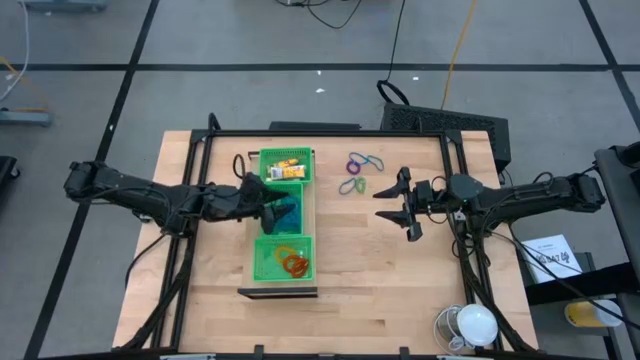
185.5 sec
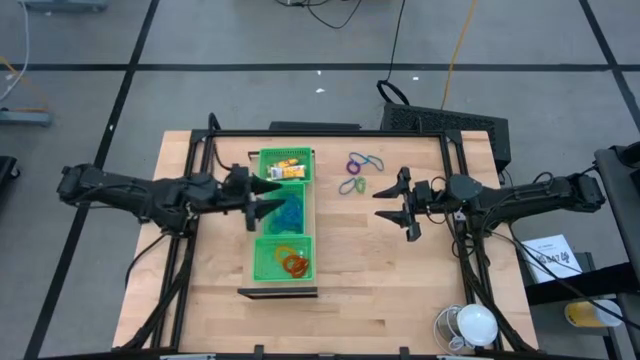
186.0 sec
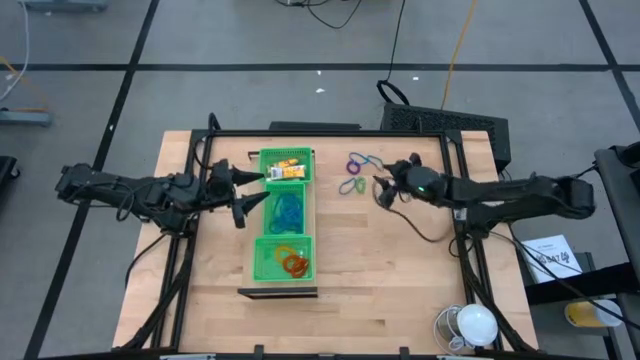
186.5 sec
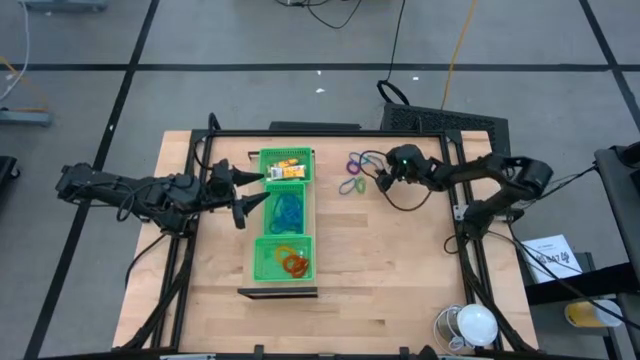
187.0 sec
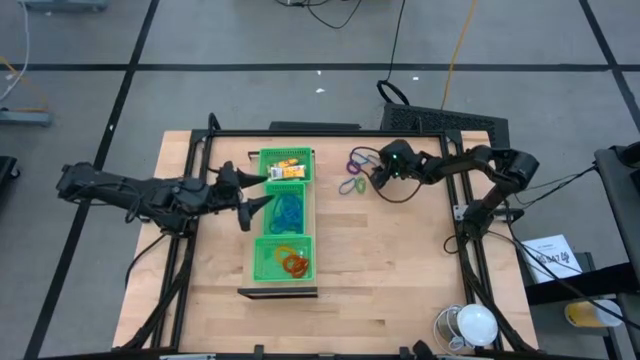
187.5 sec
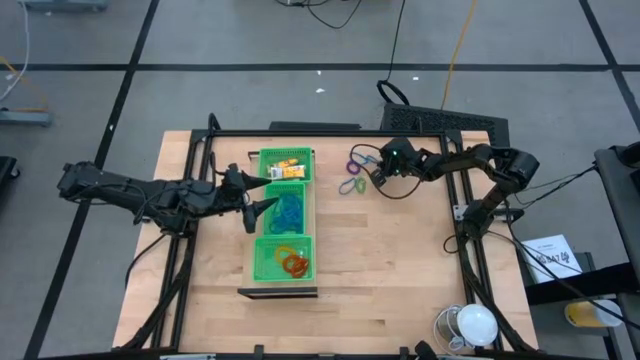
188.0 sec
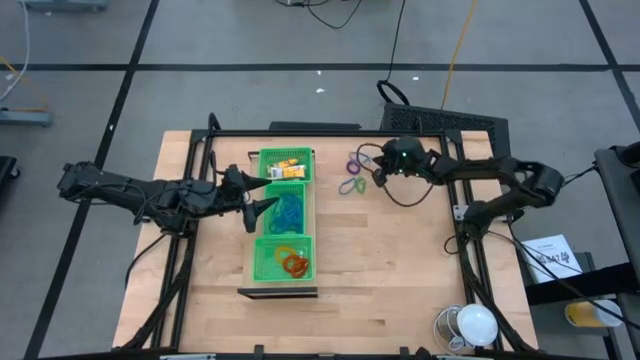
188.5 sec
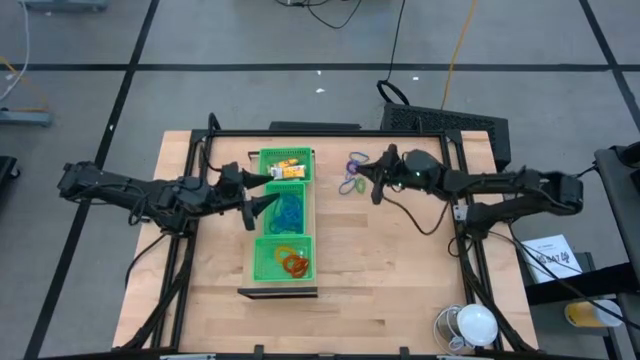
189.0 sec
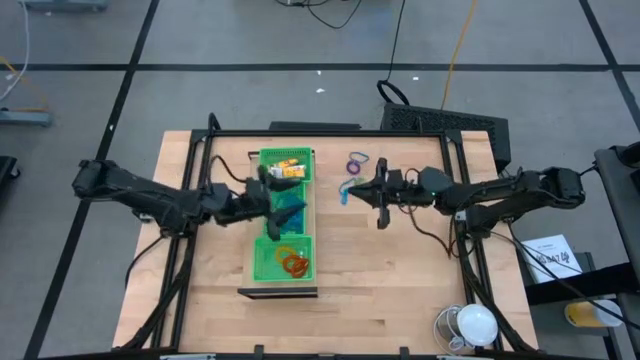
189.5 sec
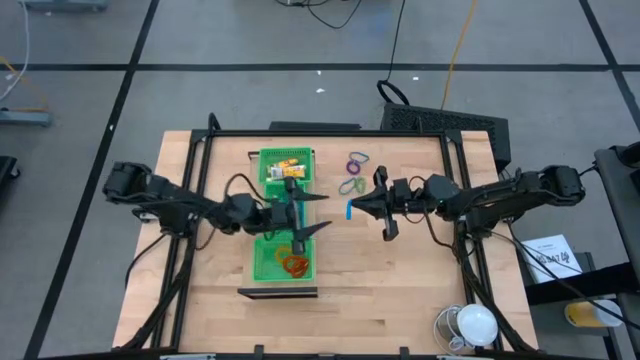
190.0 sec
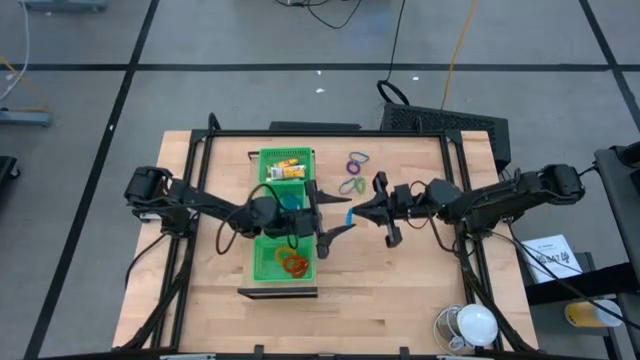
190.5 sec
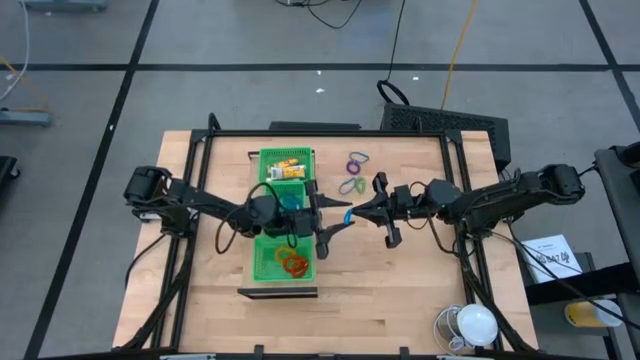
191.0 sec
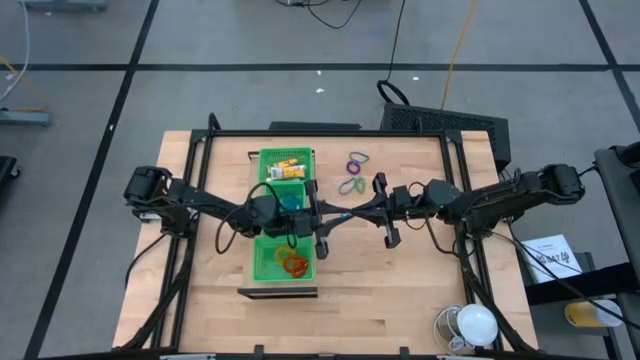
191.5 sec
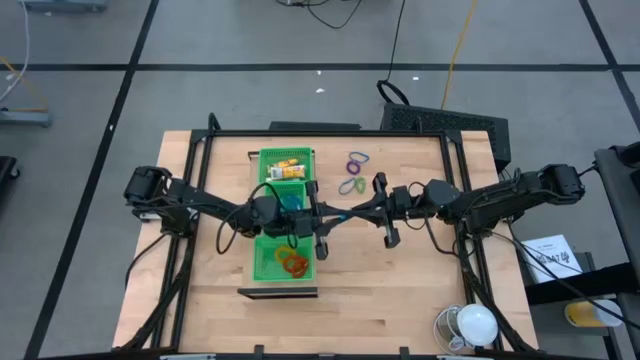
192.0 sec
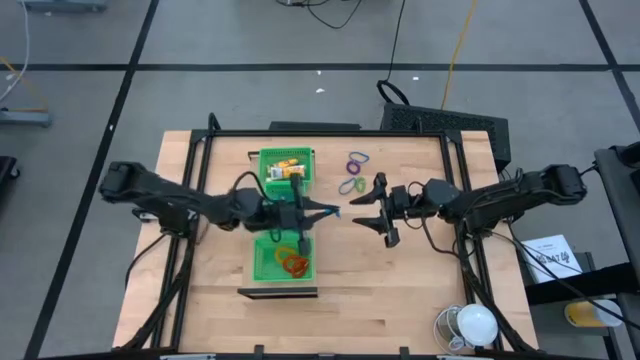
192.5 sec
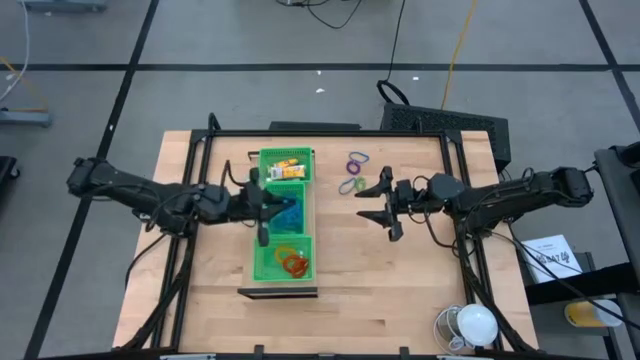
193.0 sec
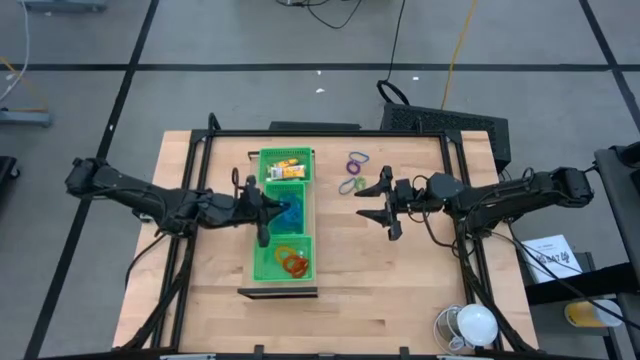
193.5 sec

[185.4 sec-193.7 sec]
Task: Pick & Place Office Desk Supplies
Put the blue rubber band into the center green bin on the shelf

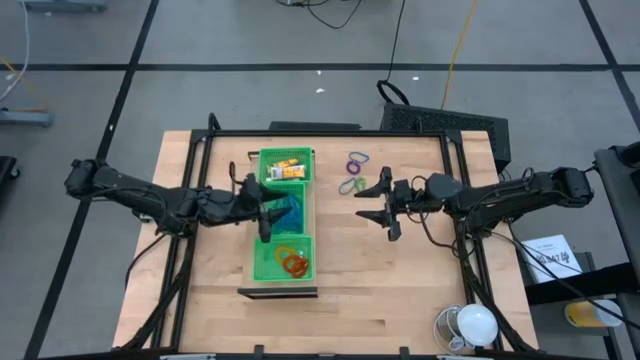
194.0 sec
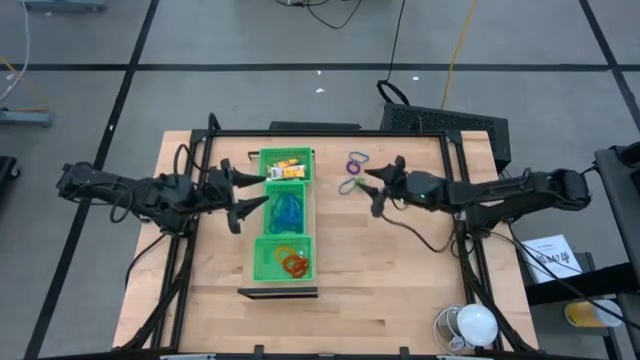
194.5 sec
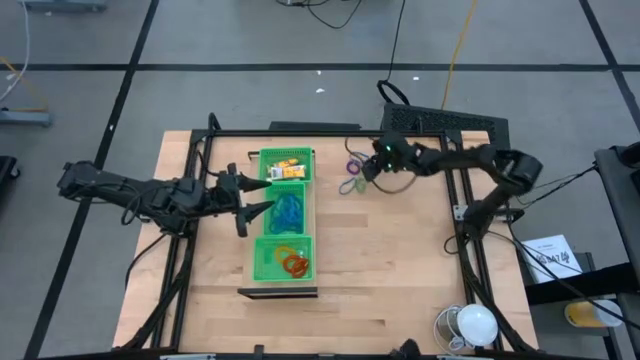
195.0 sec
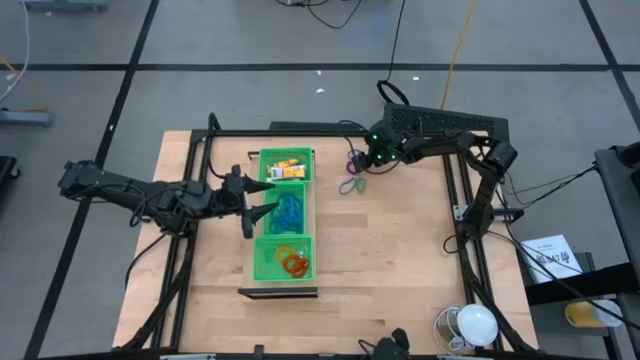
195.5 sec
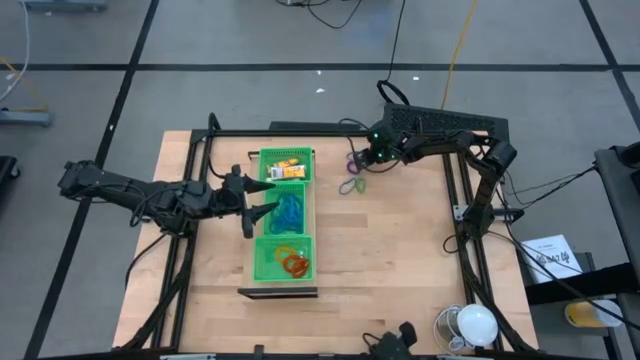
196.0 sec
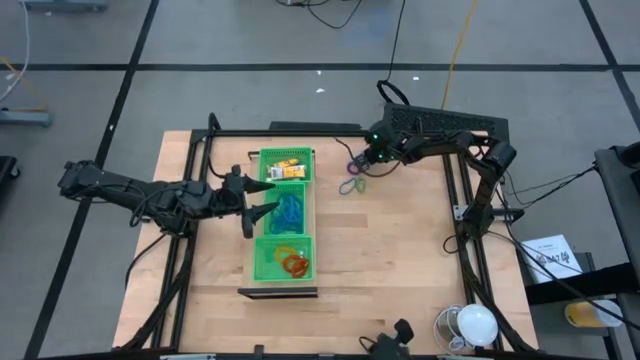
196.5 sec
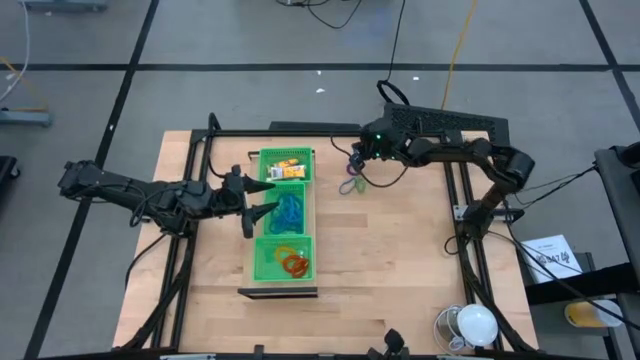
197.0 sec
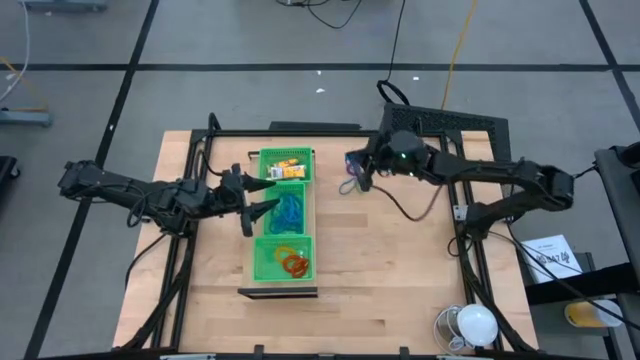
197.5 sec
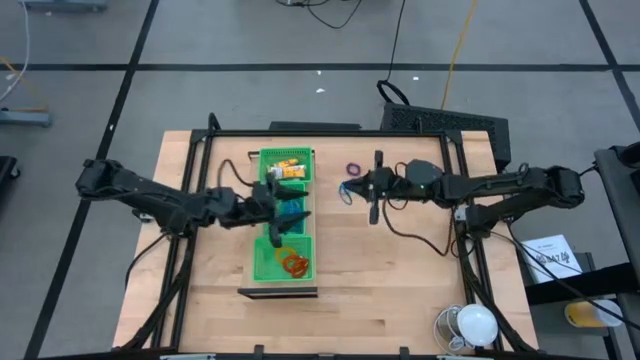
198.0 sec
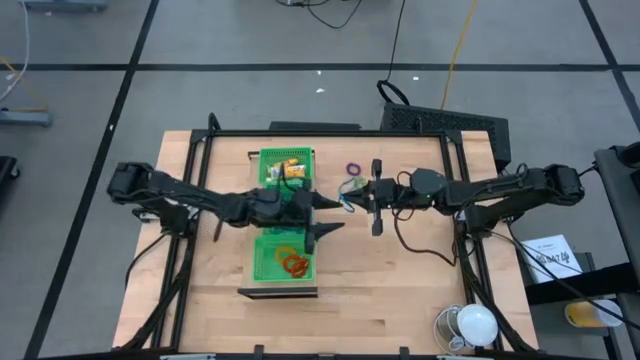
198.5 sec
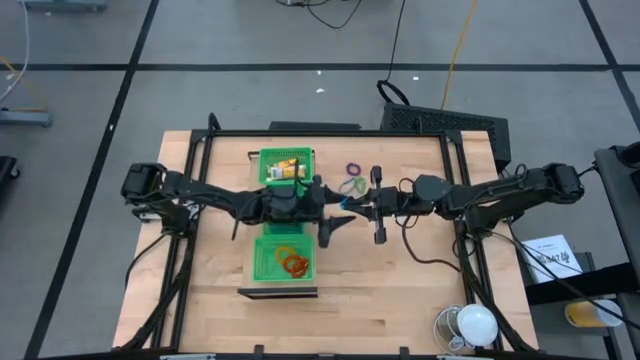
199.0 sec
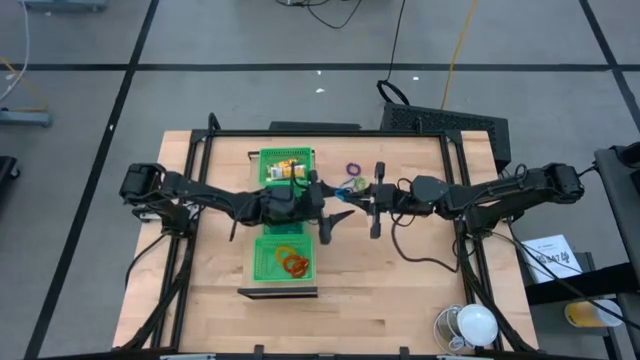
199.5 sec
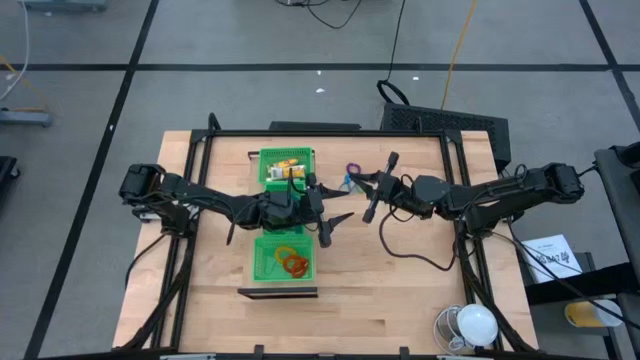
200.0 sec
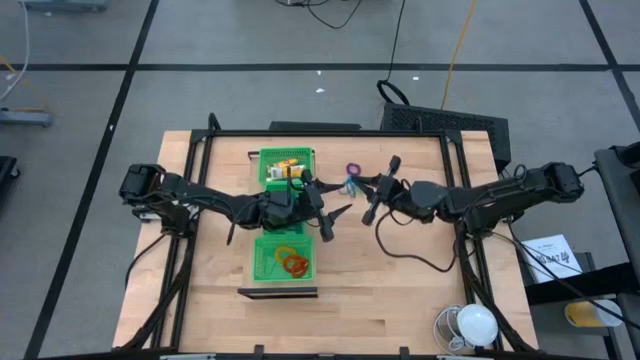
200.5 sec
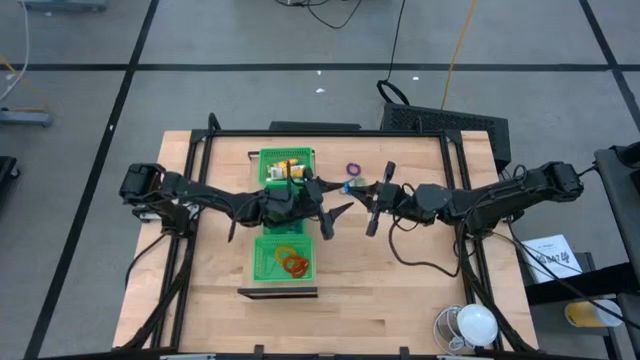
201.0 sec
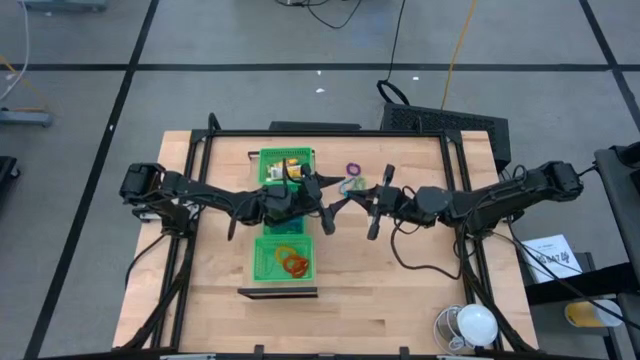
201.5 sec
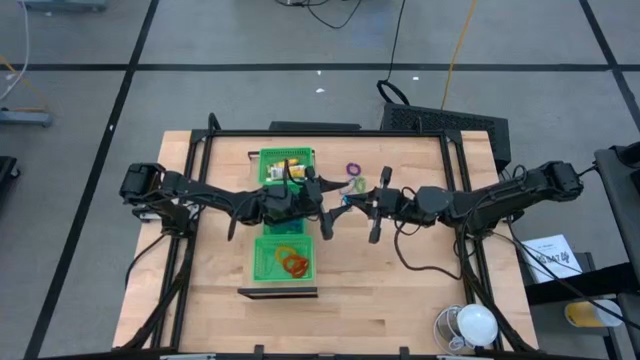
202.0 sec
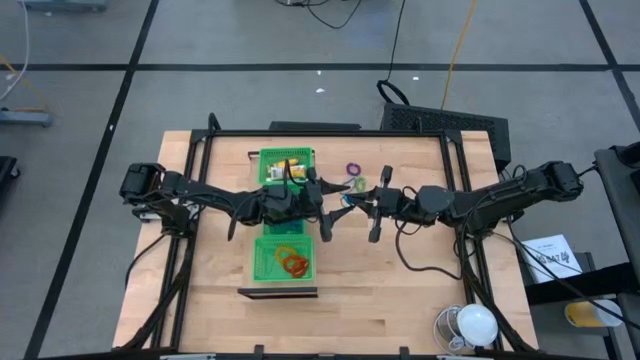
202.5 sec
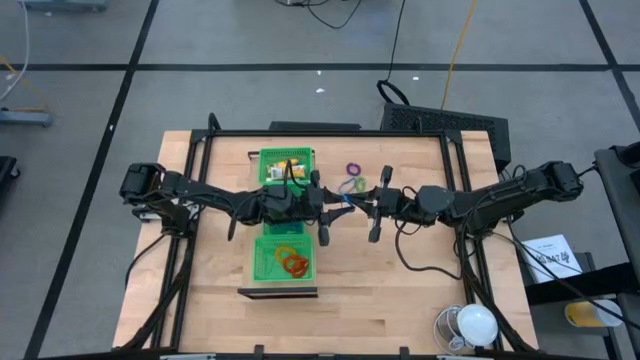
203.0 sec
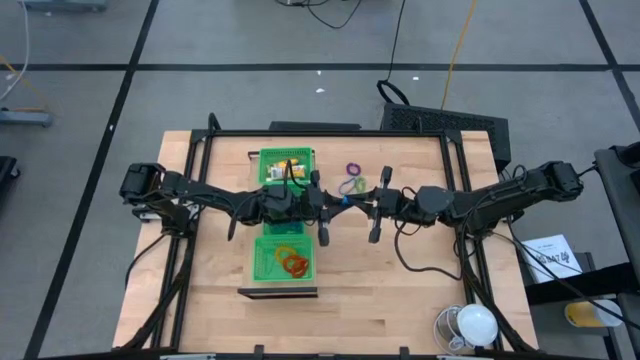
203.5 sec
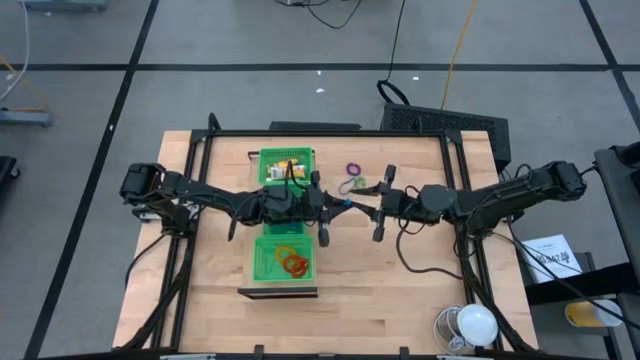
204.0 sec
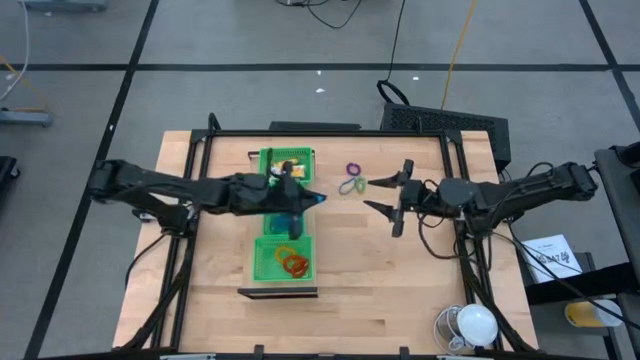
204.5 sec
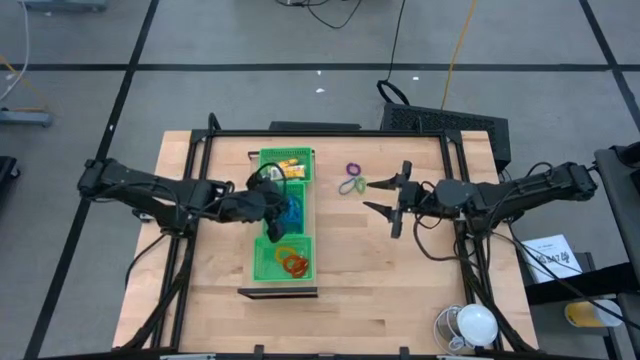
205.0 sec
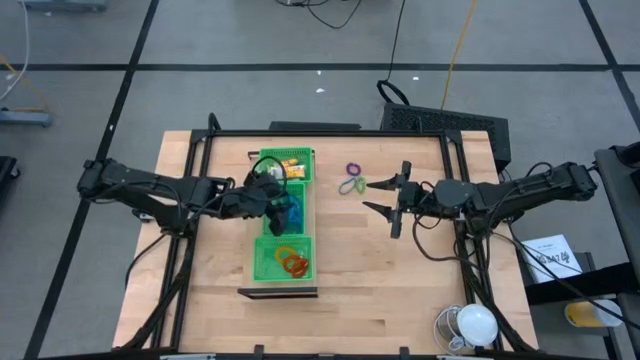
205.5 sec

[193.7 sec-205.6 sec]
Put the blue rubber band into the center green bin on the shelf

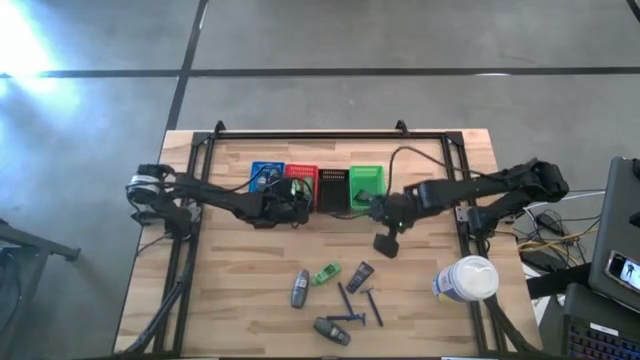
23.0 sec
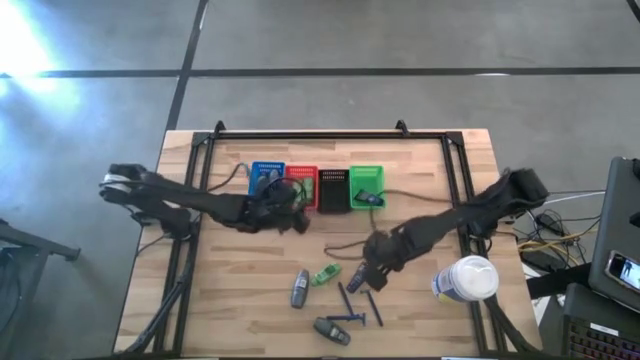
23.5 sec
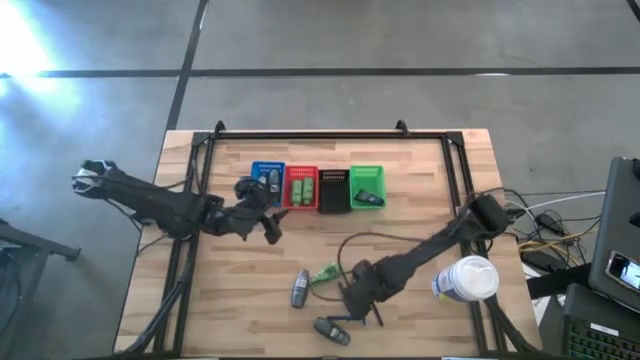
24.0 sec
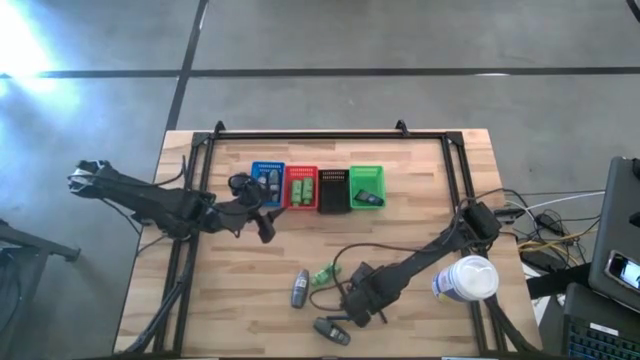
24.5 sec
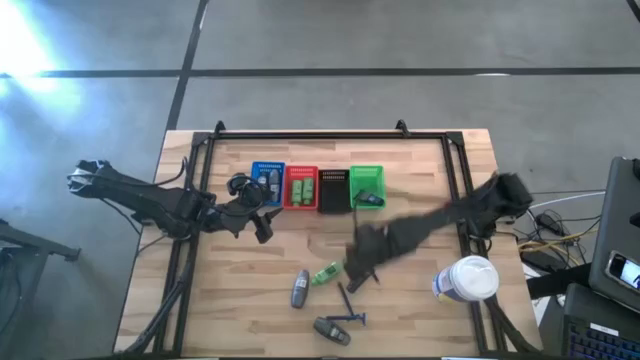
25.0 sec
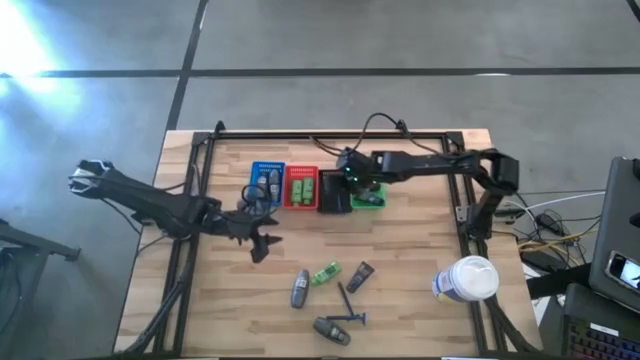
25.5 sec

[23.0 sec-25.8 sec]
Task: Pick & Place Travel size toiletries
Put the right razor into the black basket
